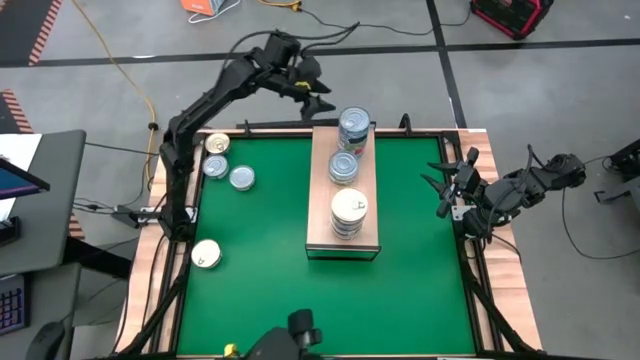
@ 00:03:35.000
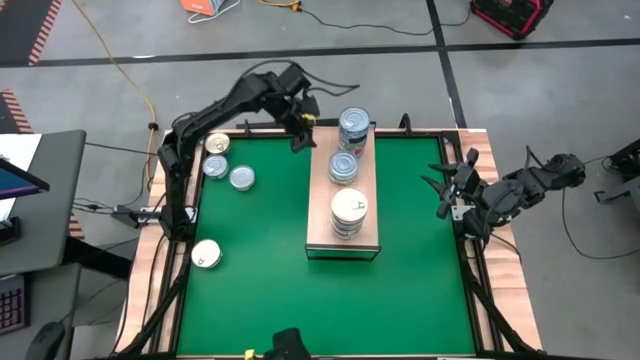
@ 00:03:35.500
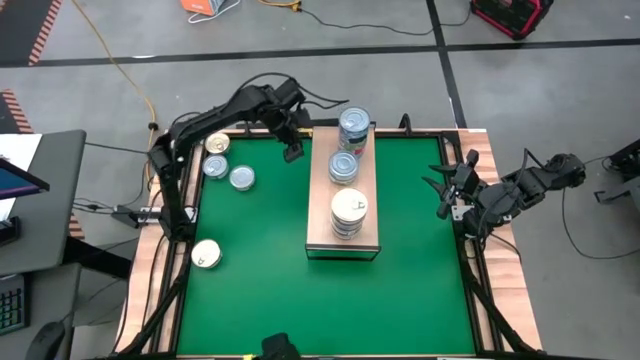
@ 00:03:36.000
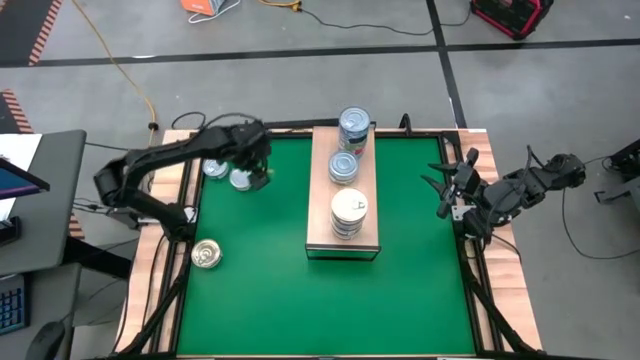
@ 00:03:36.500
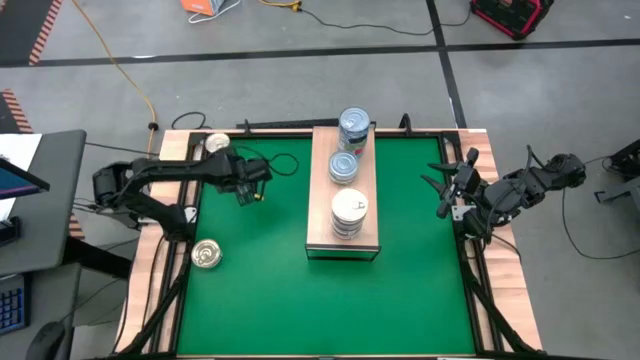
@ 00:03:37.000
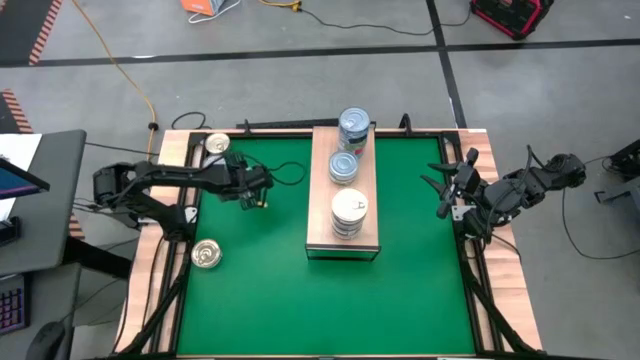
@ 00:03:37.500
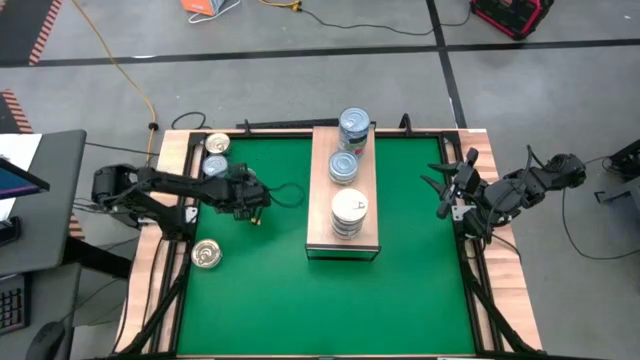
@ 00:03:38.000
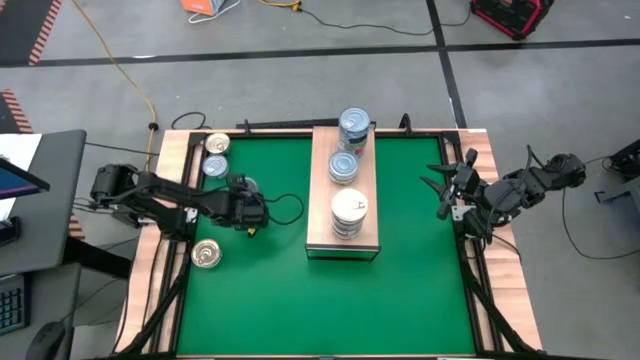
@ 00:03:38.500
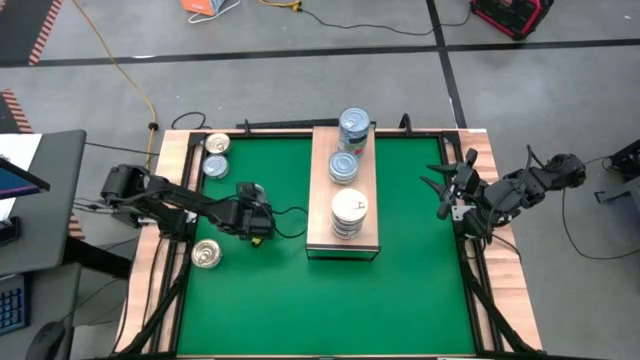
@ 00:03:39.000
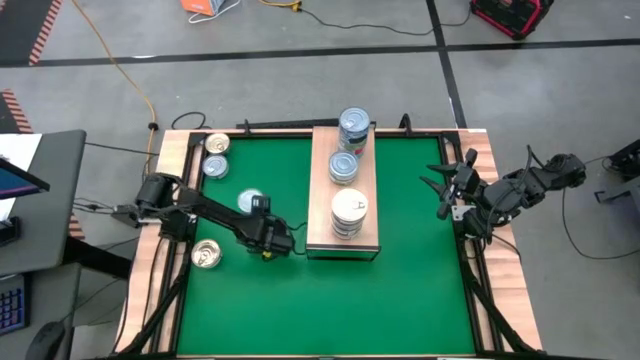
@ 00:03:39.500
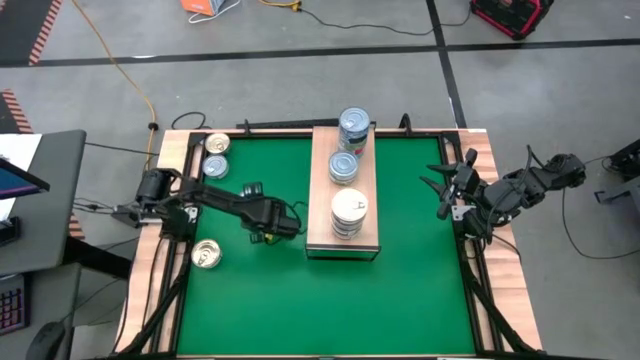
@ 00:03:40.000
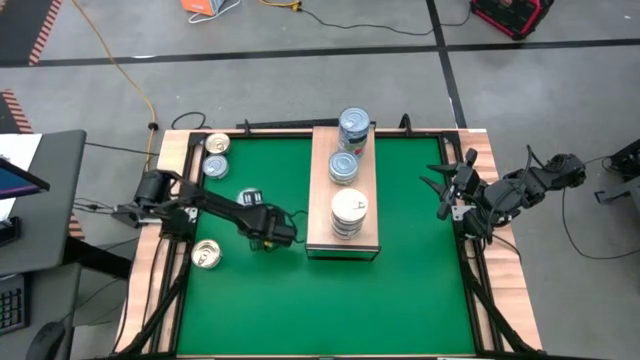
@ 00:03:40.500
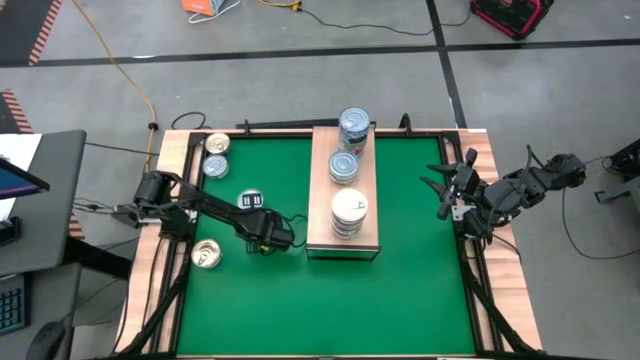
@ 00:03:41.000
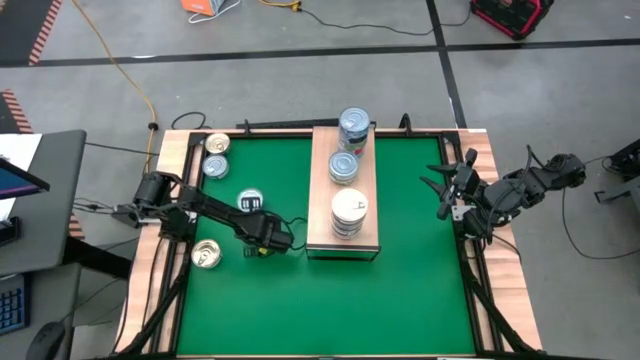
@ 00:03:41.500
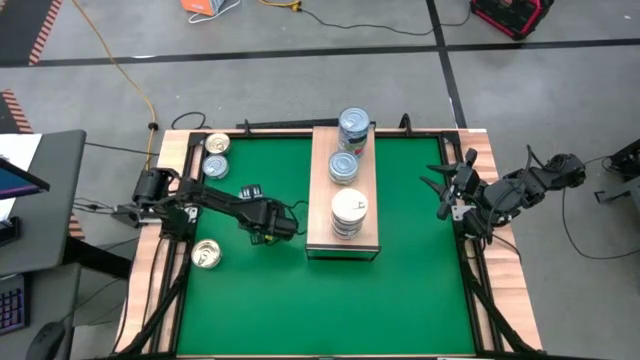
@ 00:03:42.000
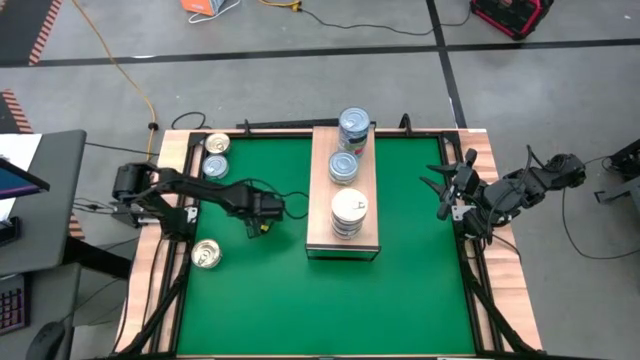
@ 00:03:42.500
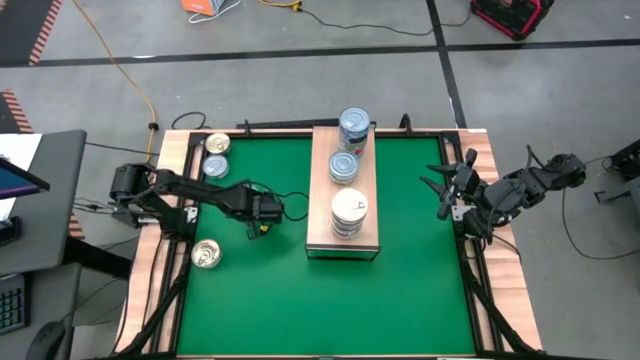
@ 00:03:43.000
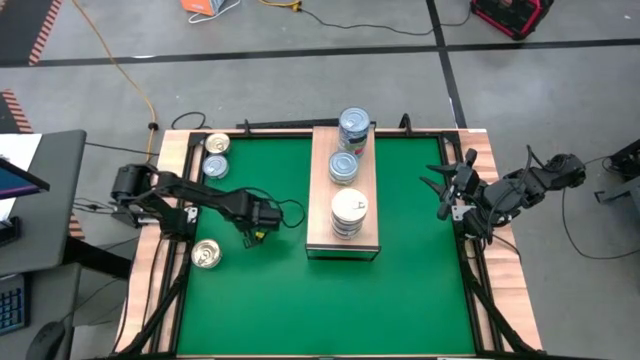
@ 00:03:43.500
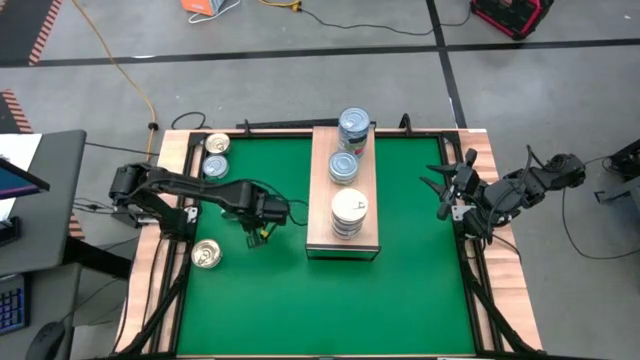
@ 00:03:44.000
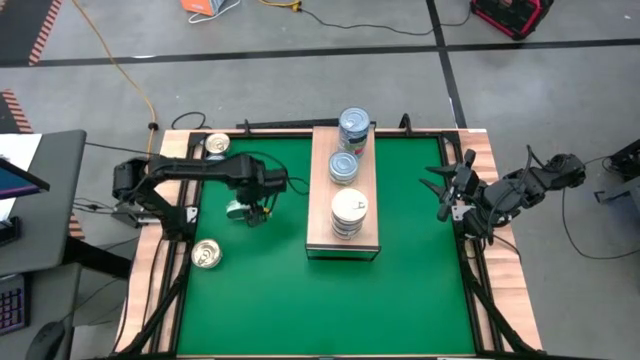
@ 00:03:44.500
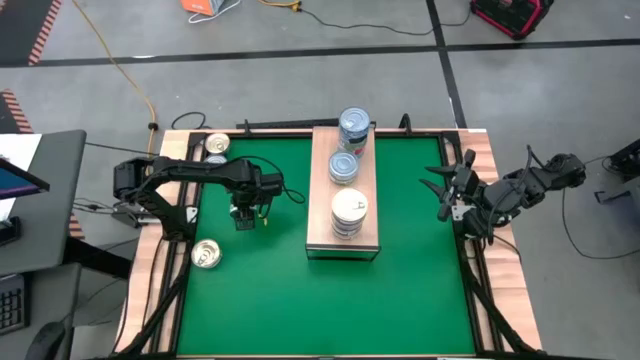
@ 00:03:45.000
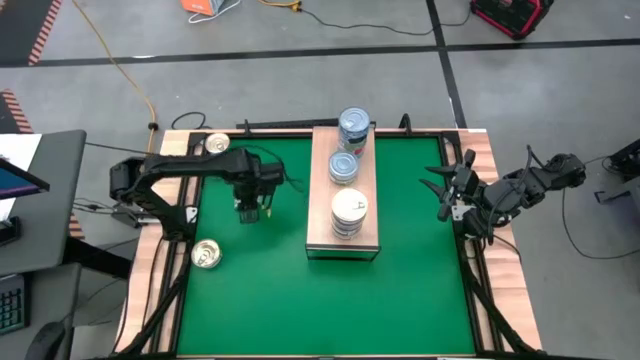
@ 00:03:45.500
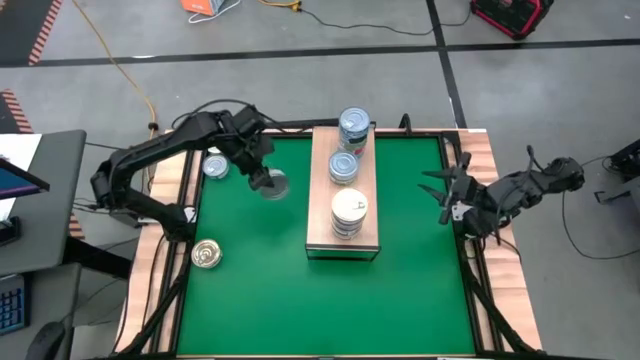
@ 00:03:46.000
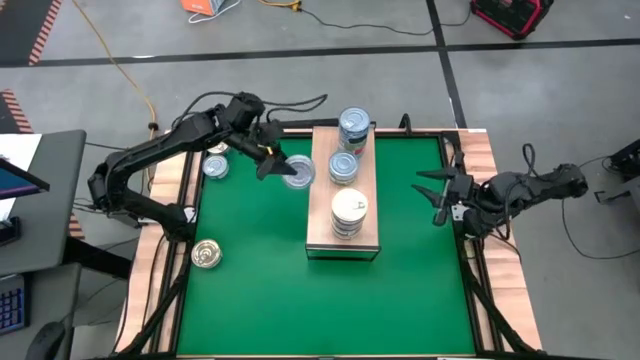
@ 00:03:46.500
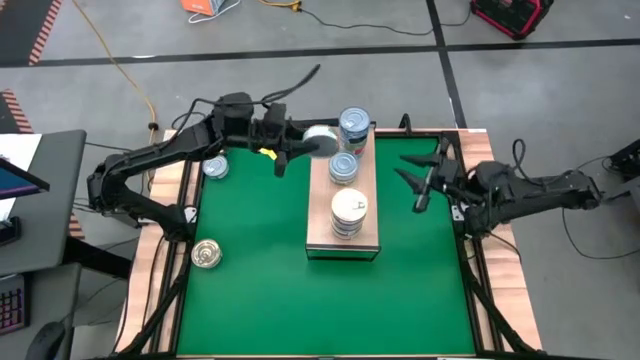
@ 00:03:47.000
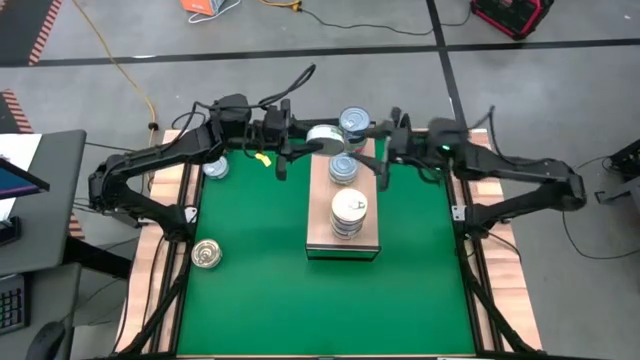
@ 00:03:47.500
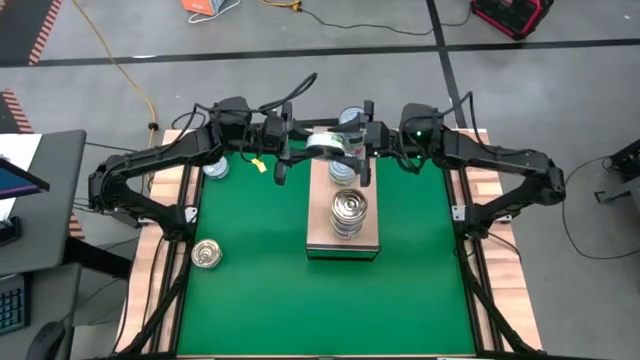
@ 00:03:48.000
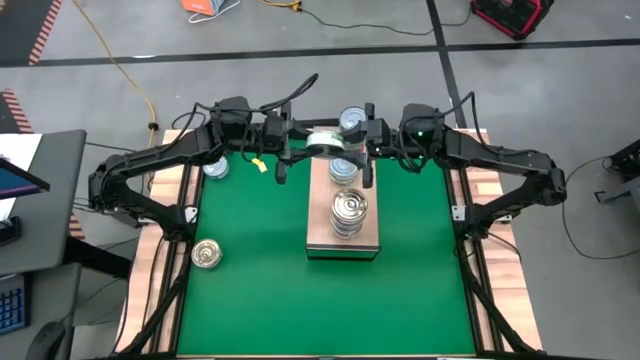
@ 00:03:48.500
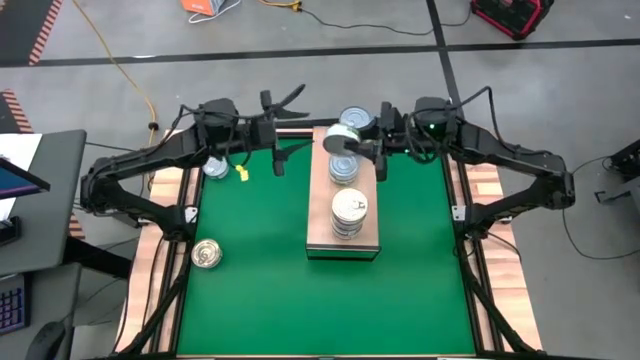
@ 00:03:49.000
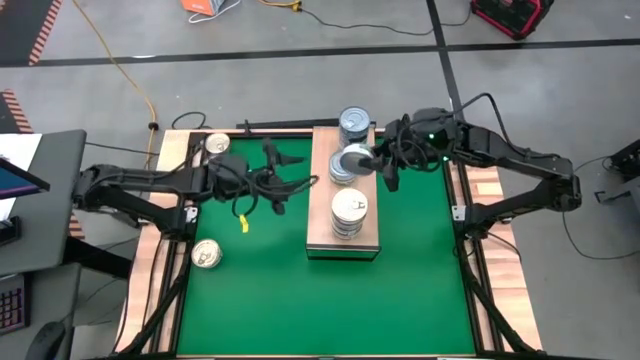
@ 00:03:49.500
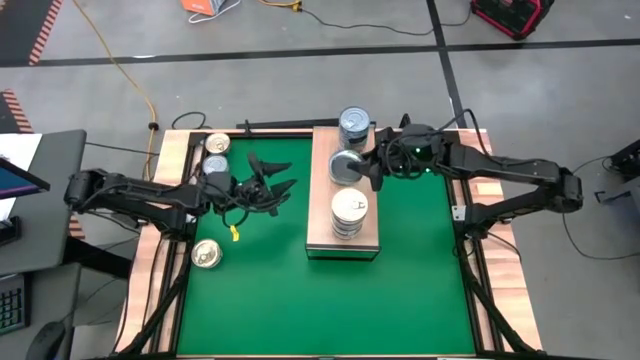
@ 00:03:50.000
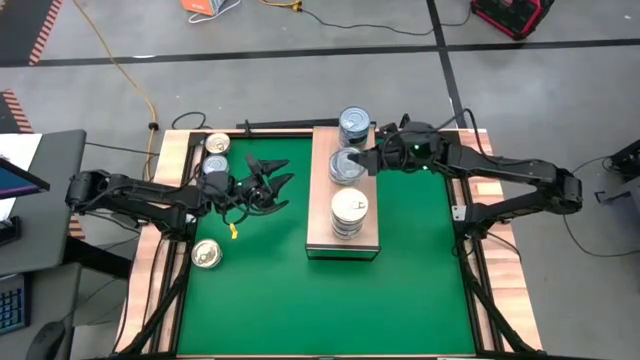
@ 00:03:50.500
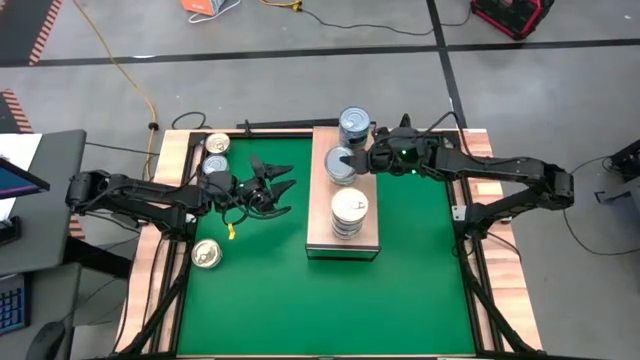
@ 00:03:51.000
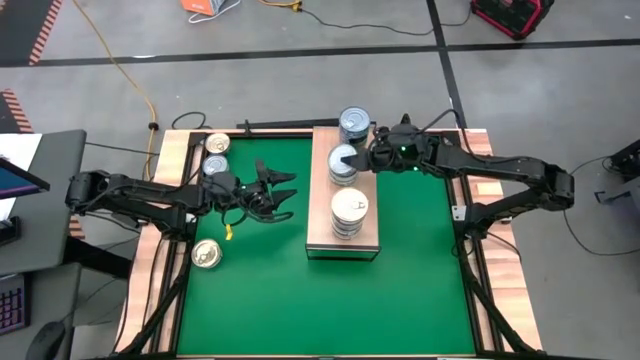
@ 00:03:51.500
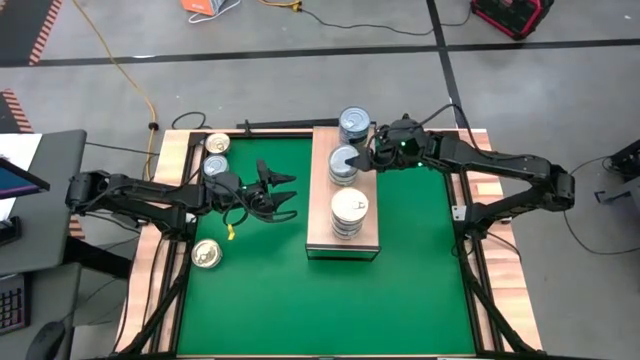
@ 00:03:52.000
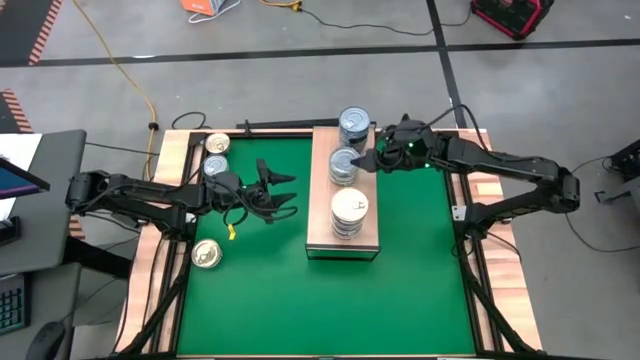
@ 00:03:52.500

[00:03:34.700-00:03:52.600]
Task: Stack canned seafood by type on shelf
Stack the green tuna can on top of the green tuna can on the shelf

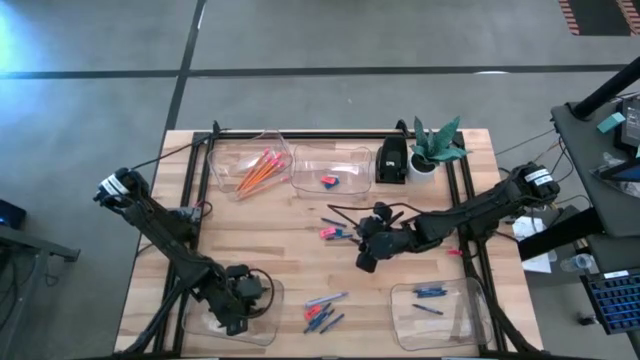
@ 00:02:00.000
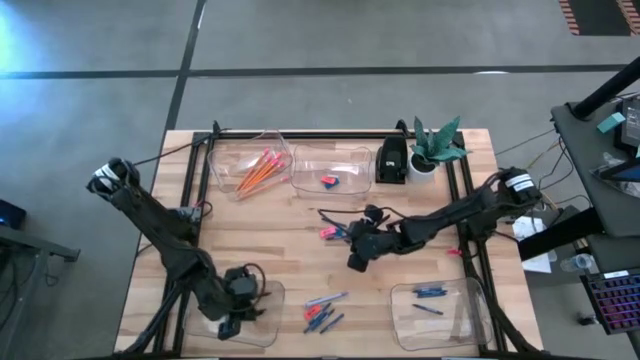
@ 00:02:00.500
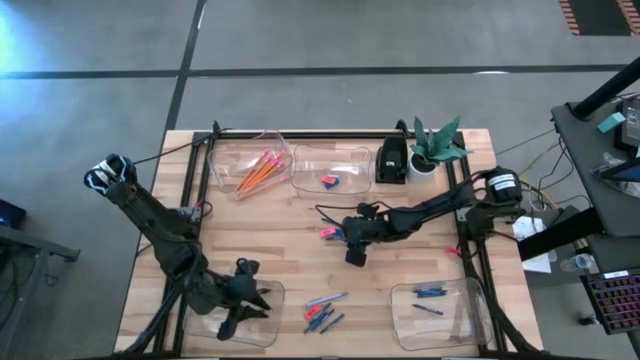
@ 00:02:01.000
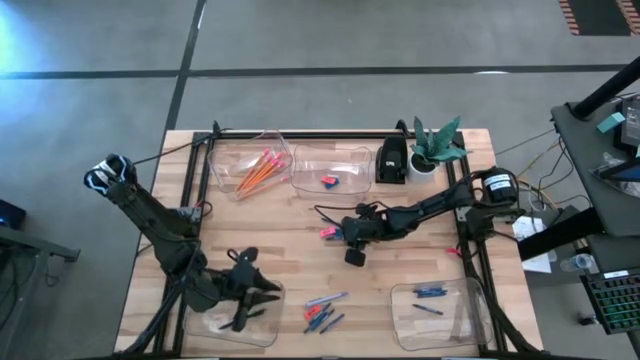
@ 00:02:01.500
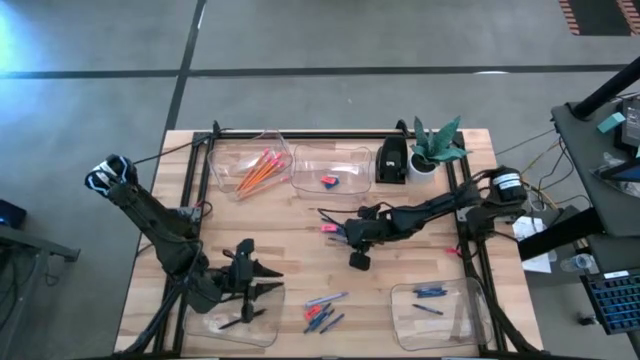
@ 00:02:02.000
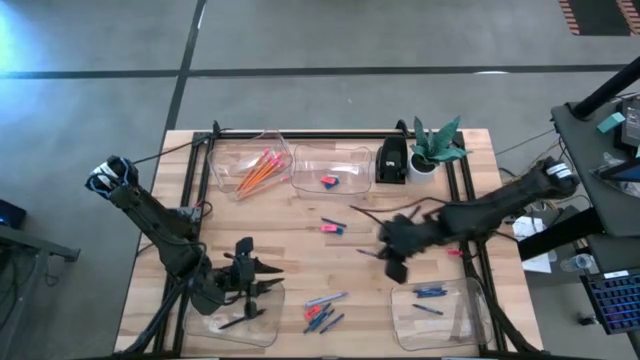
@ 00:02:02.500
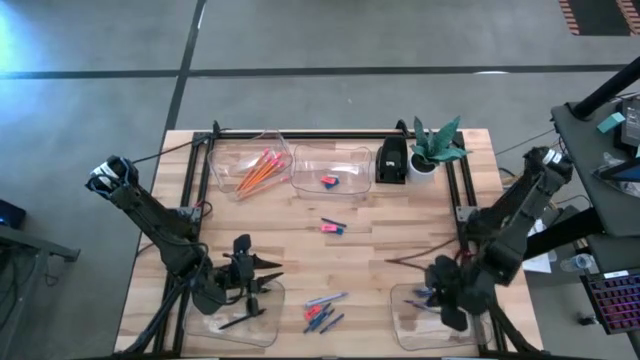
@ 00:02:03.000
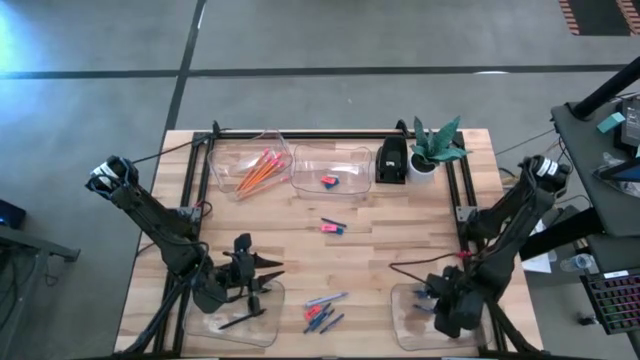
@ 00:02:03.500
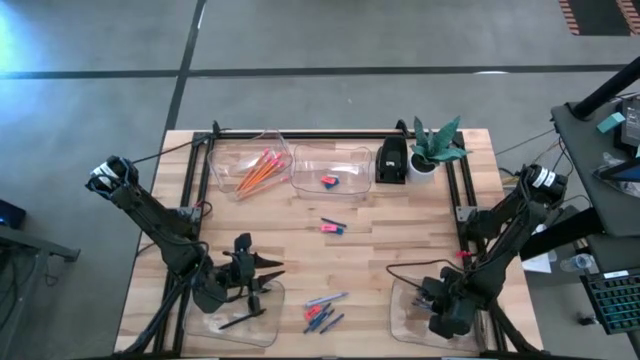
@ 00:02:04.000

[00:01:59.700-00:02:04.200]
Task: Sort crayons/erasers/pens/pencils in bins
Put the dark blue crayon into the bottom right transparent bin
